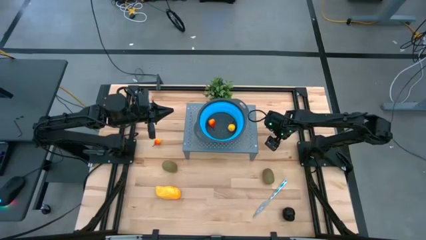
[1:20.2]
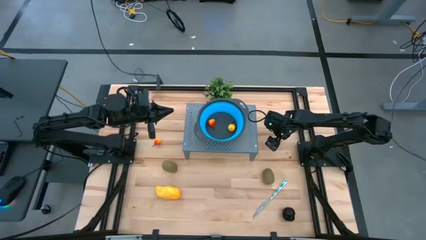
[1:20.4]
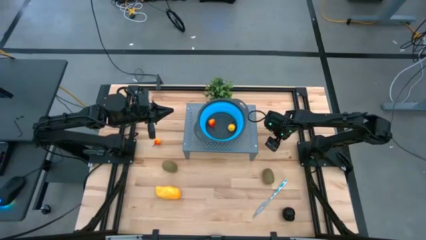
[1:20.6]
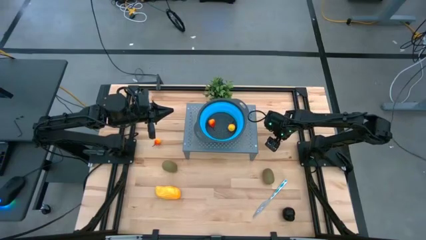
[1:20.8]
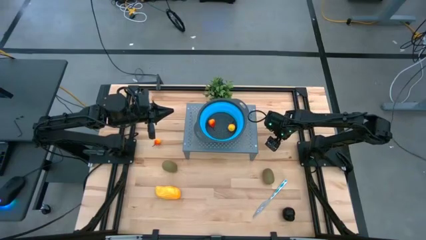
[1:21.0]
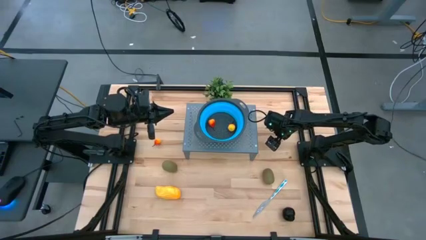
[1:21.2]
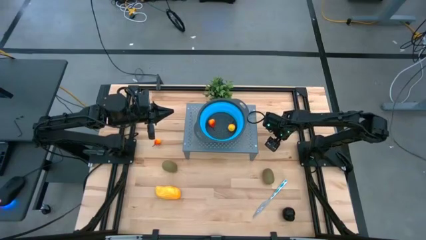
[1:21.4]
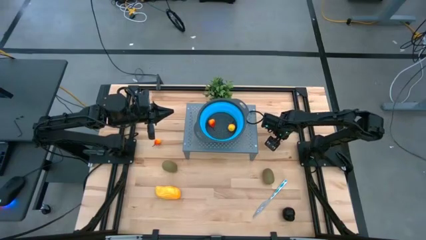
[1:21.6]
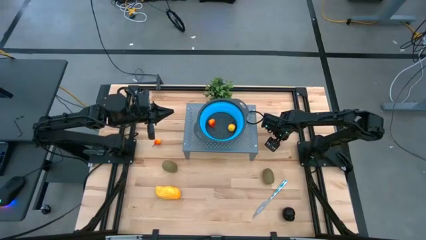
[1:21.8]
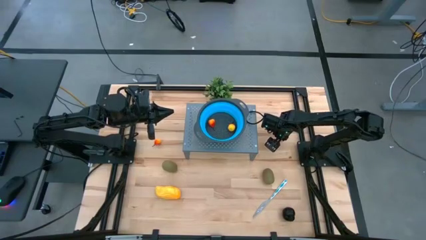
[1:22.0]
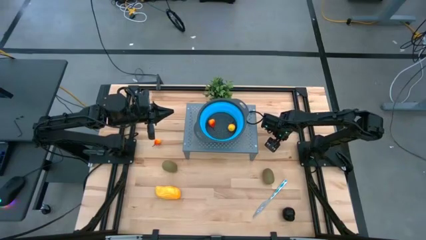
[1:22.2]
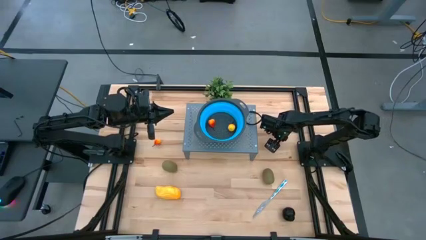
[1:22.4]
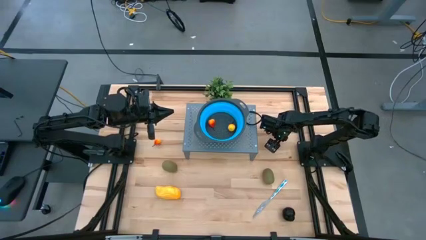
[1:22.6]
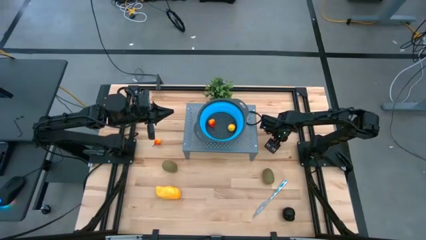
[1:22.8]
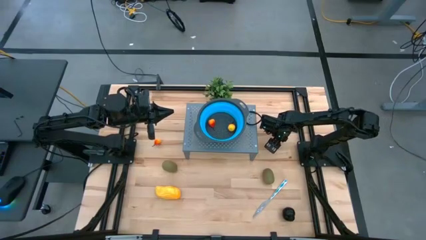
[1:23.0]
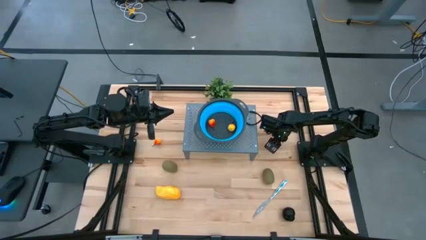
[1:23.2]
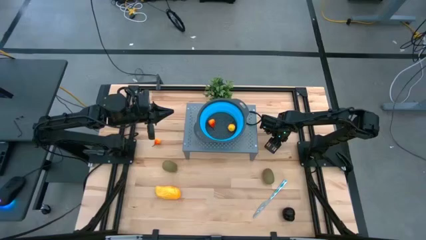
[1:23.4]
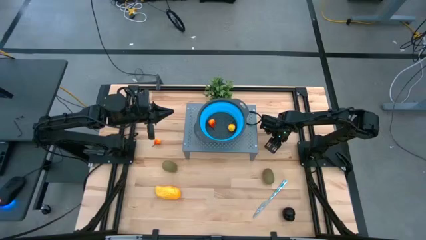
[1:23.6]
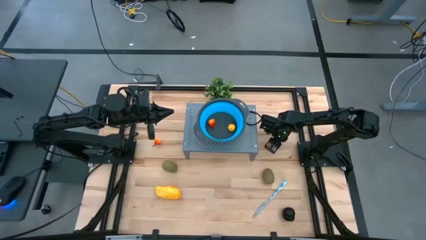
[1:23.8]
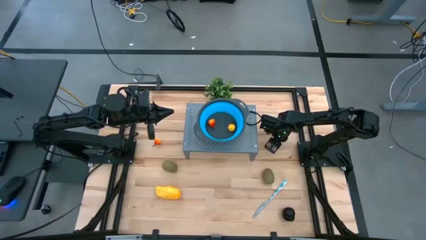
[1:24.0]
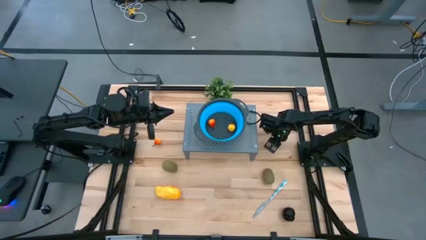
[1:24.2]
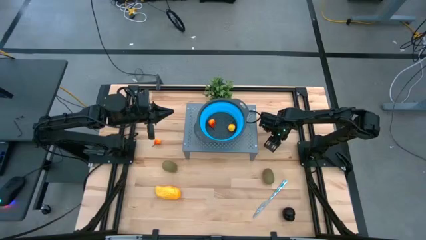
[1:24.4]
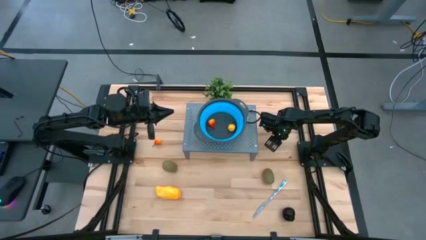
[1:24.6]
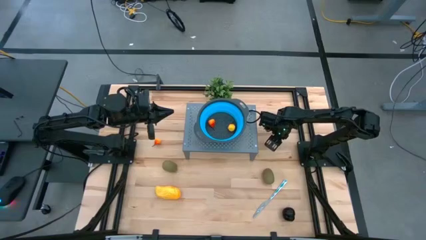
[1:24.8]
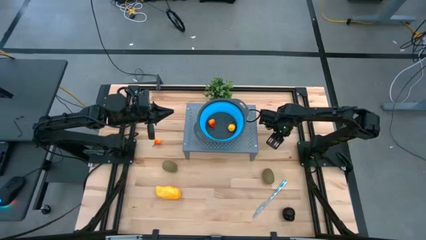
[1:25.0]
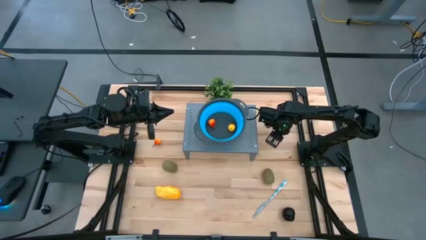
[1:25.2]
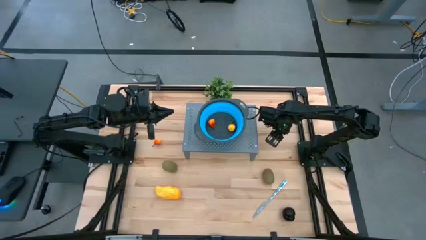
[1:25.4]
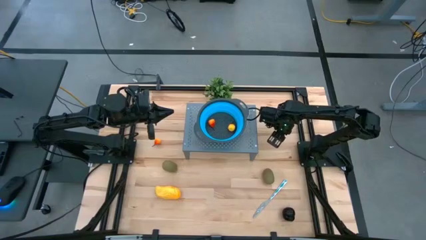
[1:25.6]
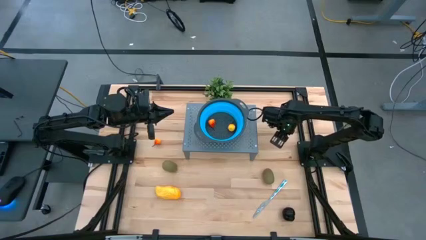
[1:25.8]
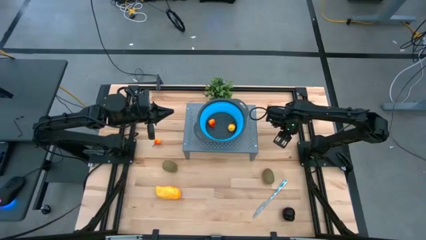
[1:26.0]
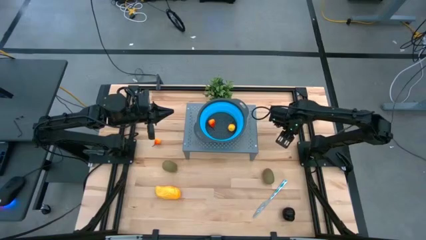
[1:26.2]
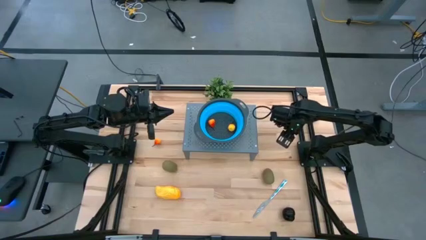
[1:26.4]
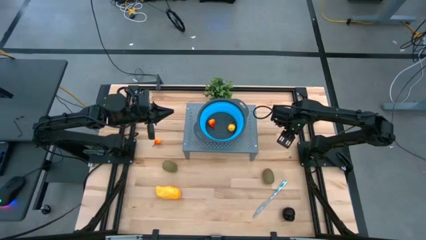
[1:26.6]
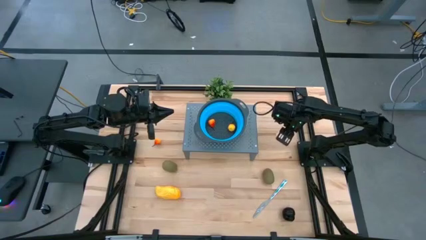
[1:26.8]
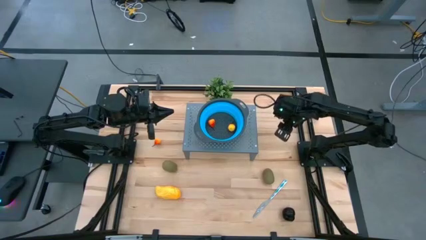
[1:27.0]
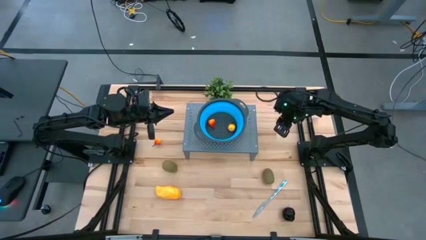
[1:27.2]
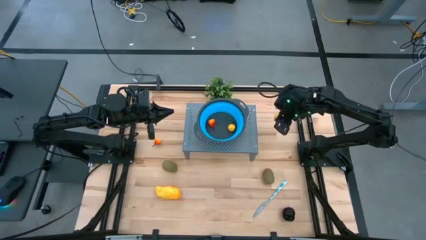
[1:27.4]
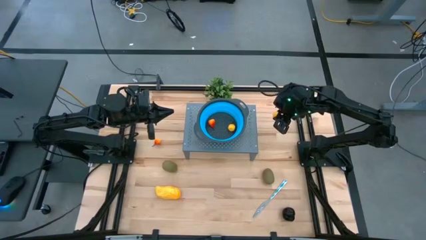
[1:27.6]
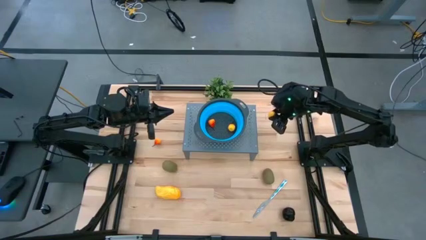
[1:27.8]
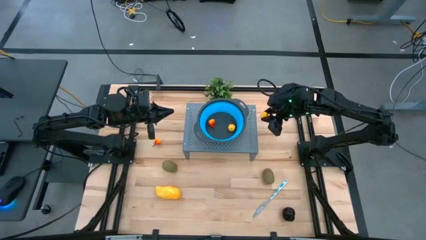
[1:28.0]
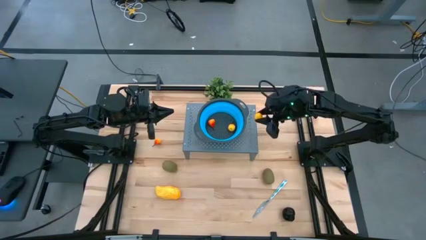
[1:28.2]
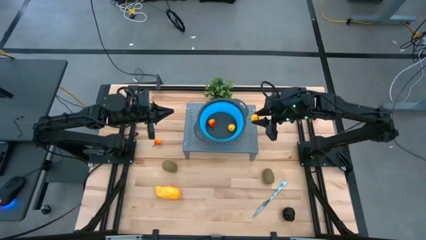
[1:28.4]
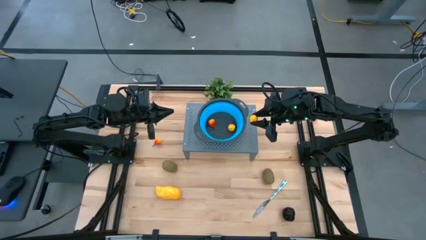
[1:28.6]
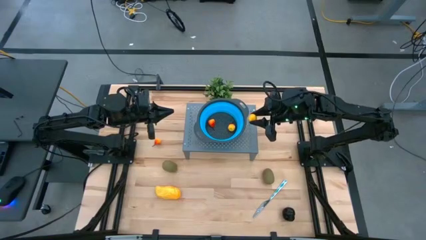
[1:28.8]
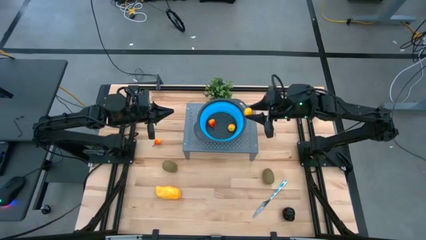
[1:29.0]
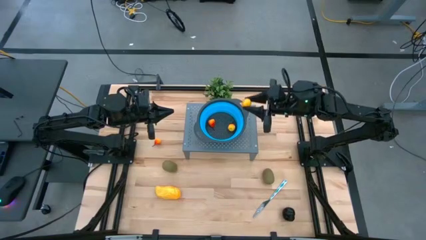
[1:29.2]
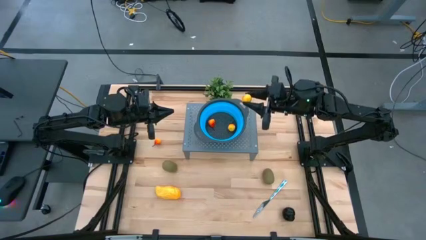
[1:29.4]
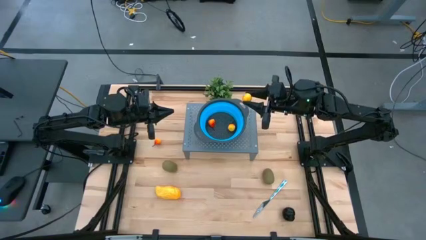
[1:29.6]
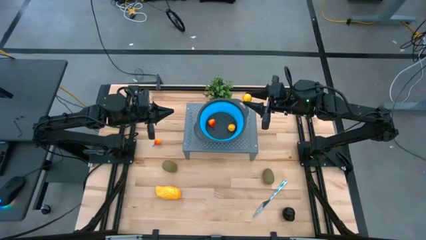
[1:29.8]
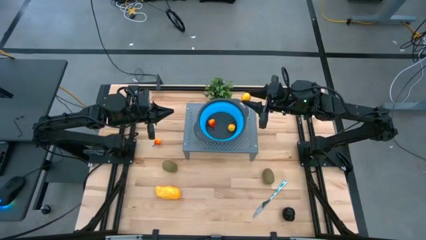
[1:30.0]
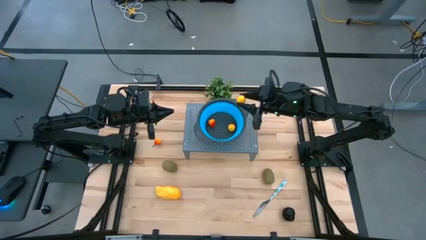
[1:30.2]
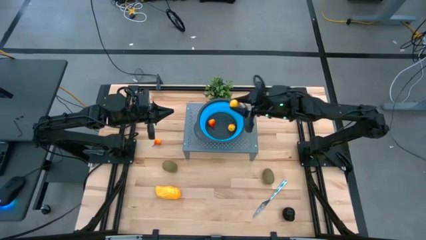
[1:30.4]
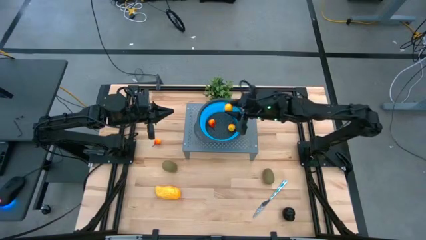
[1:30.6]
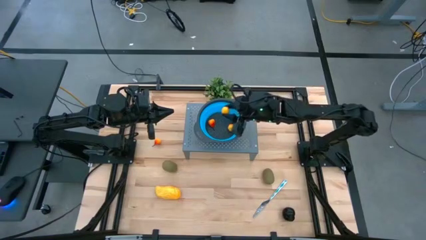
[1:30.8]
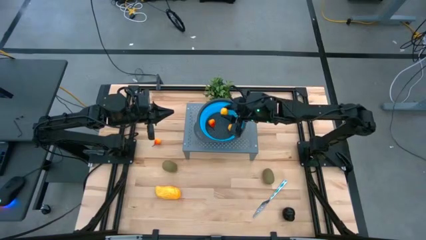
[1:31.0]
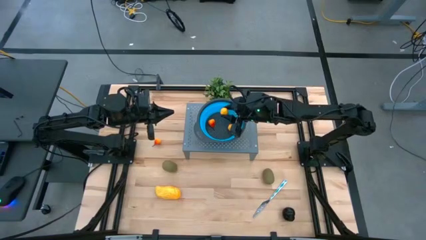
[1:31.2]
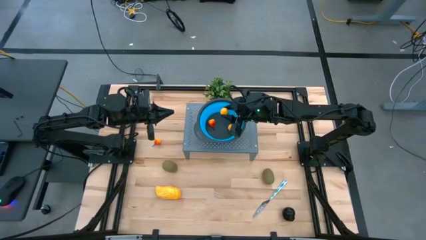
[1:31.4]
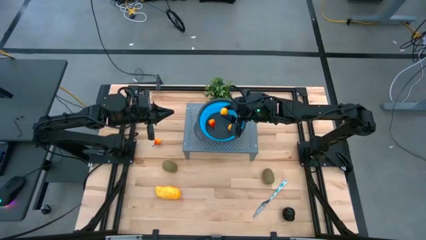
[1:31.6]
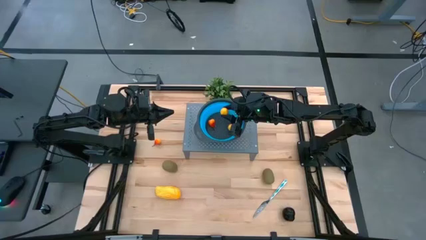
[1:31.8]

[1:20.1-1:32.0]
Task: Pick & Place Fruit
Put the right orange pear into the strainer bowl on the shelf

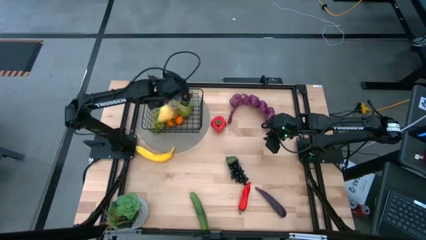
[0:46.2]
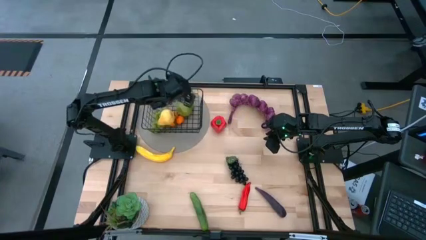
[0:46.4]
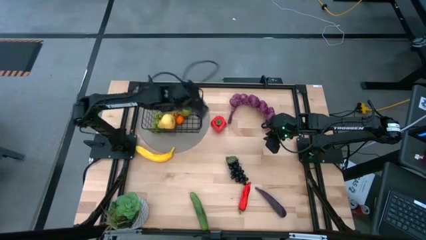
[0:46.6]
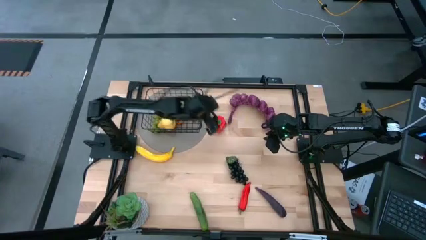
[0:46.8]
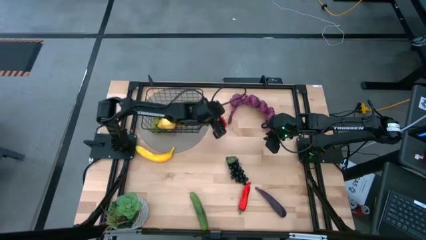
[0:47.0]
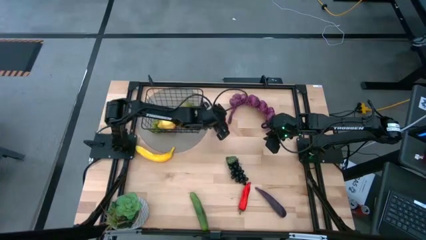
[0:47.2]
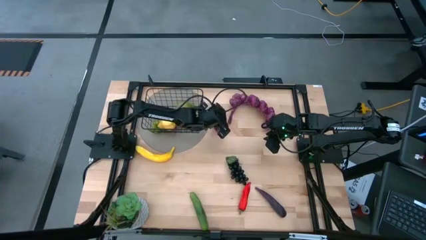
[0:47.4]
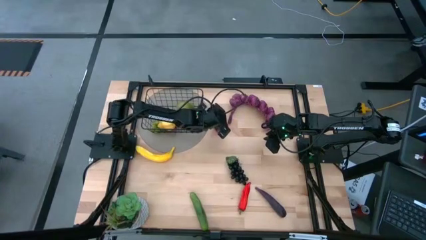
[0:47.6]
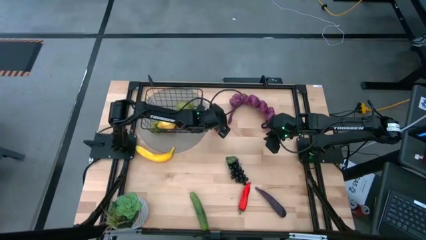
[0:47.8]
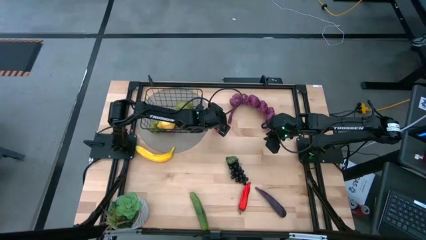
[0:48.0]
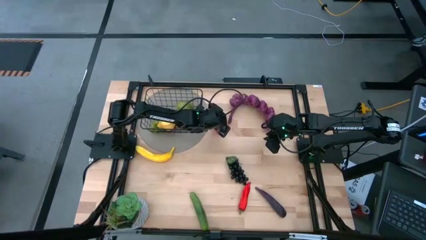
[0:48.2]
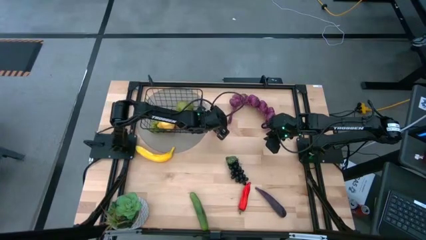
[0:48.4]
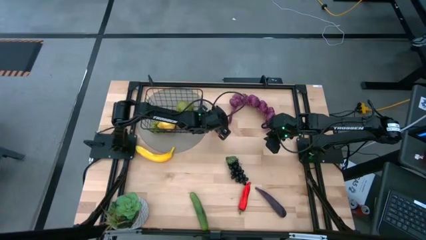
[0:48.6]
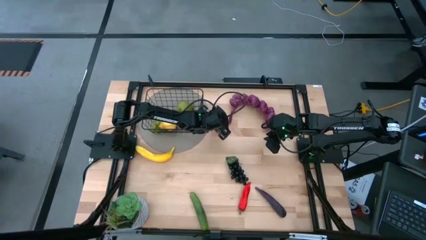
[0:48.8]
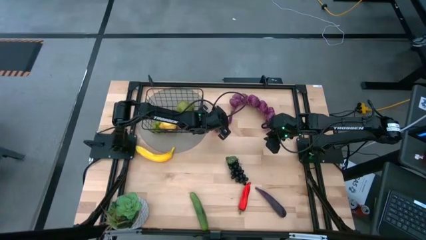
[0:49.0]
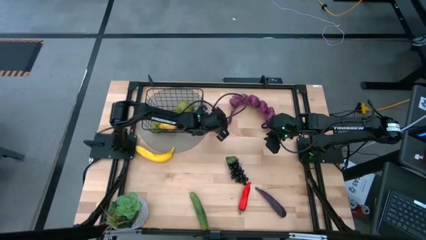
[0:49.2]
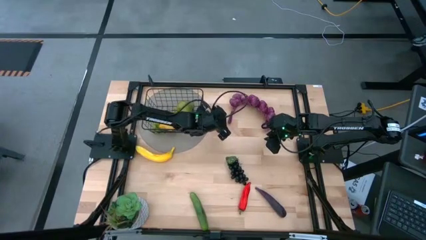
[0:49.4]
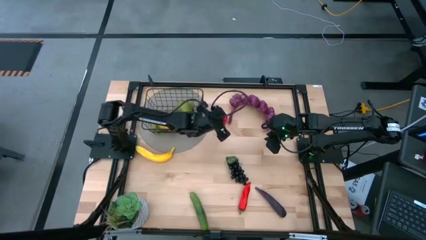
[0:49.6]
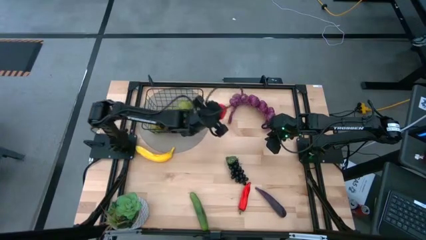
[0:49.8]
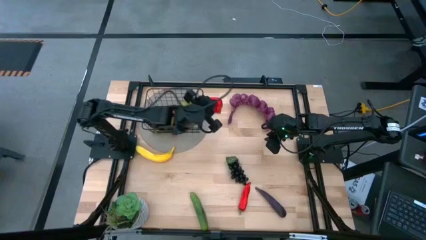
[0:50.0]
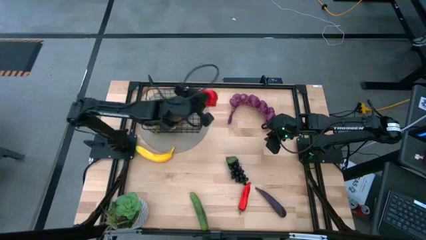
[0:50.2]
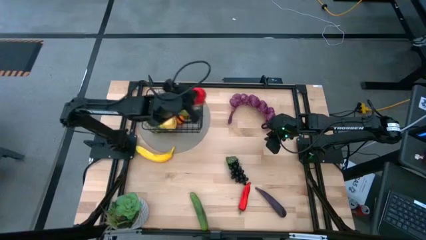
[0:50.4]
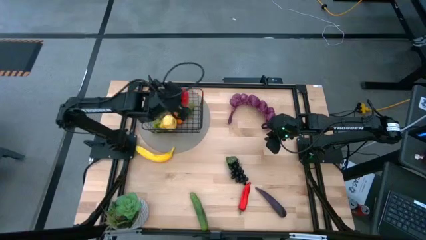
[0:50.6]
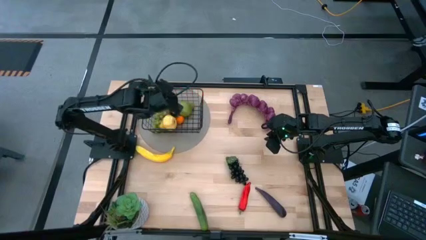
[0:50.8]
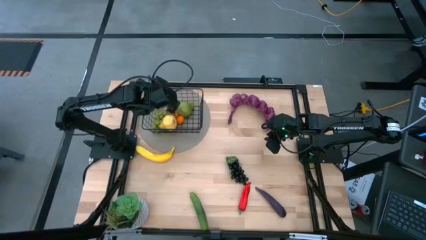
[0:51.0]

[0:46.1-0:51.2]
Task: Build produce basket
Put the bell pepper into the wire basket
